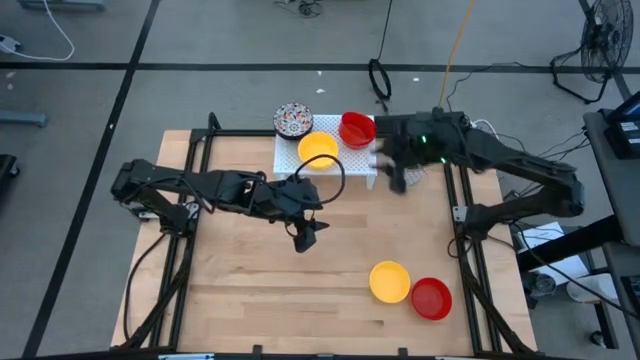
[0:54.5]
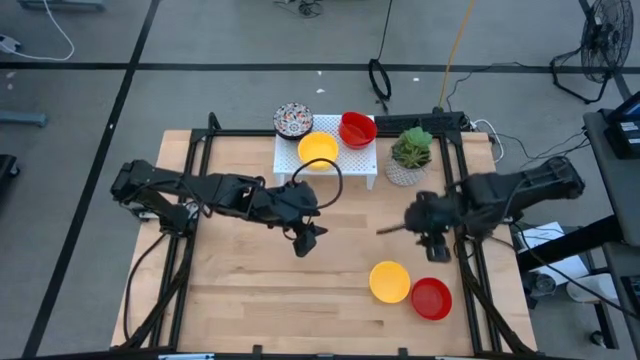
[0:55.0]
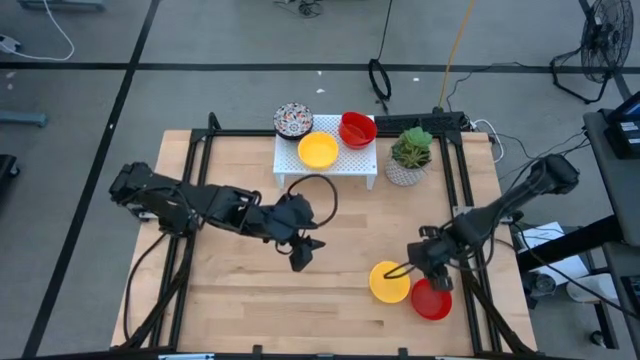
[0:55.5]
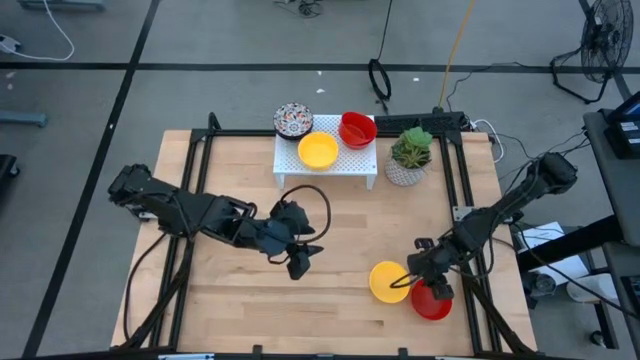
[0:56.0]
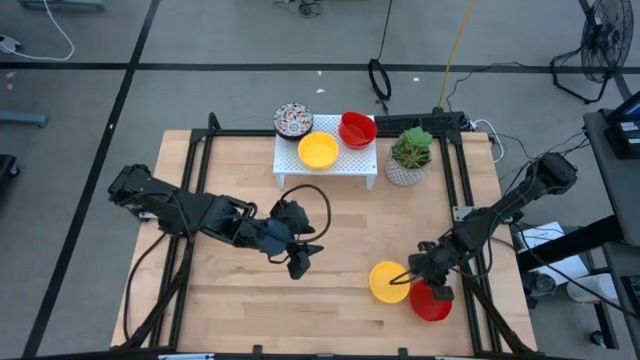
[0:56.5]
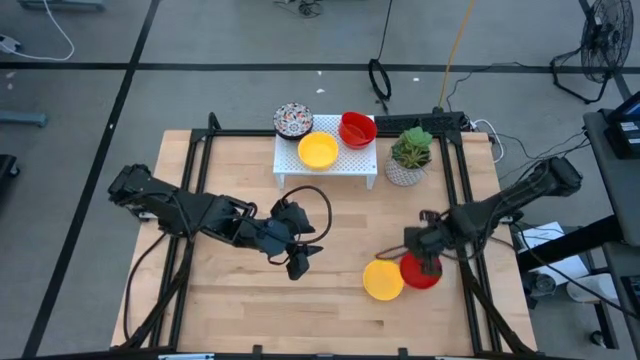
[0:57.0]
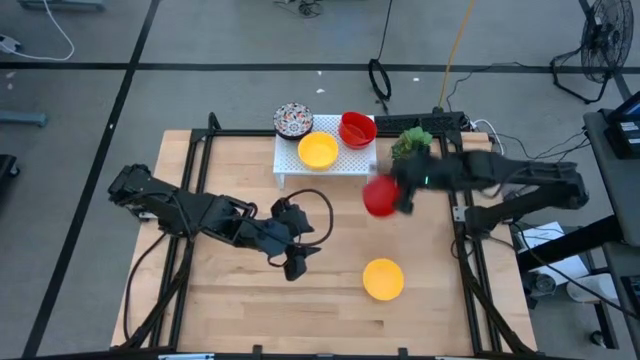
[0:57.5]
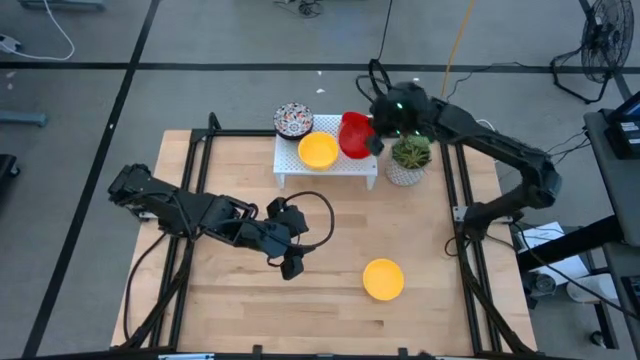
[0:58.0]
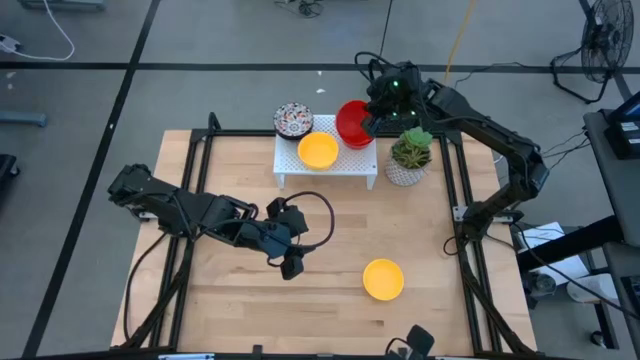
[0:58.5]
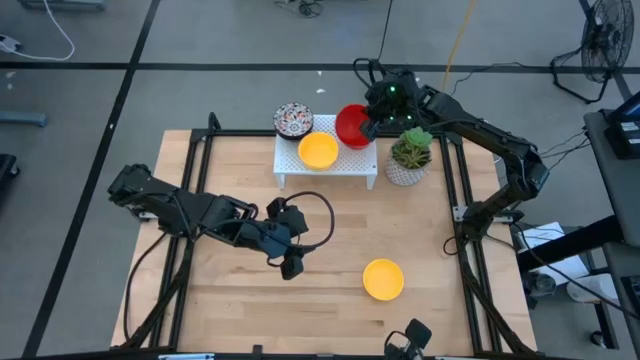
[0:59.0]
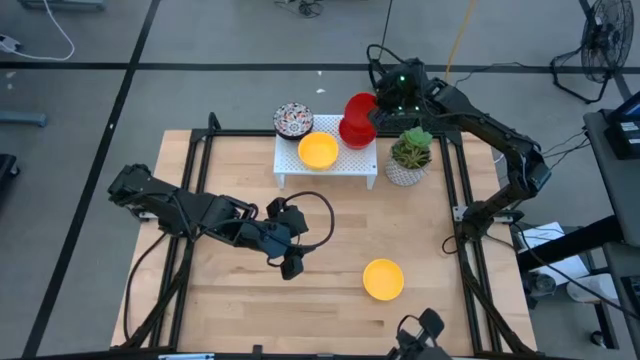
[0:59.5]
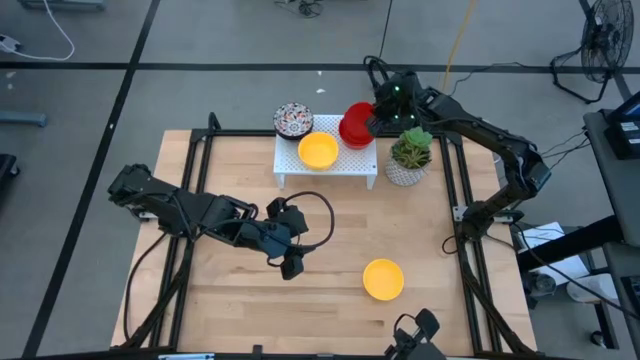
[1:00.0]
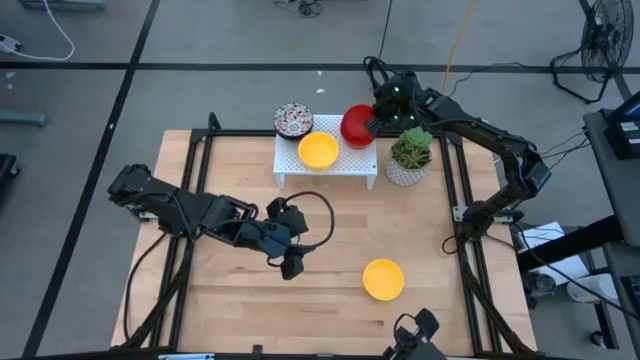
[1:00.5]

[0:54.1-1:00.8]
Task: Pick & Place Mini bowls
Stack the red bowl on the red bowl on the shelf

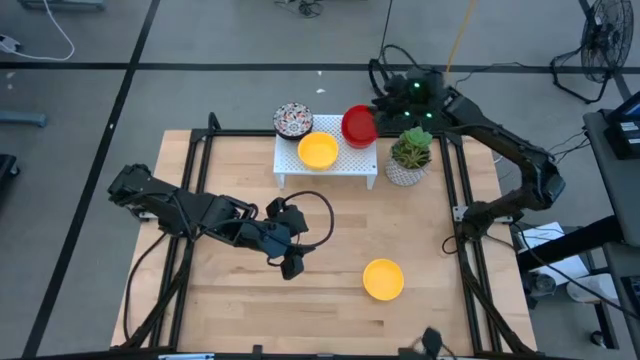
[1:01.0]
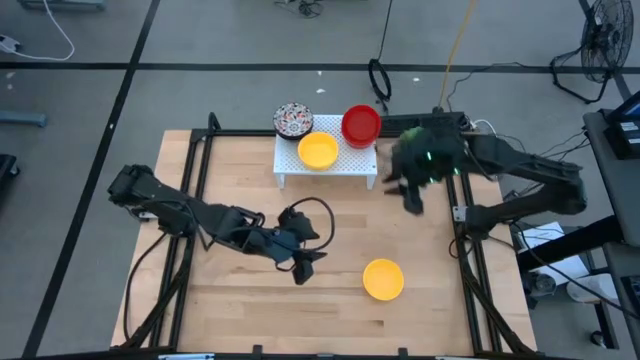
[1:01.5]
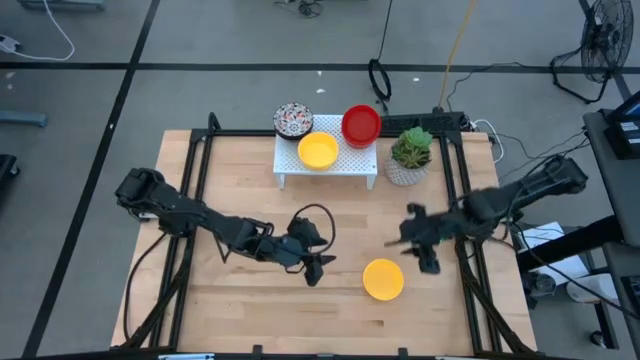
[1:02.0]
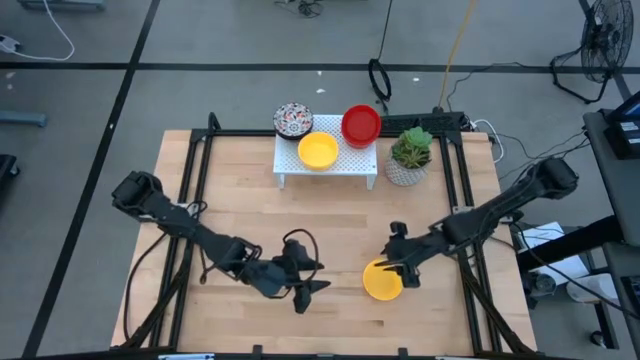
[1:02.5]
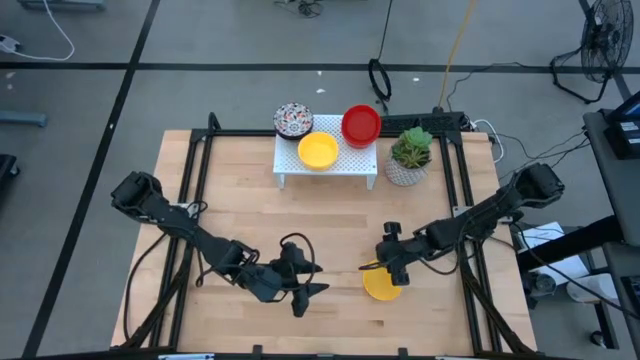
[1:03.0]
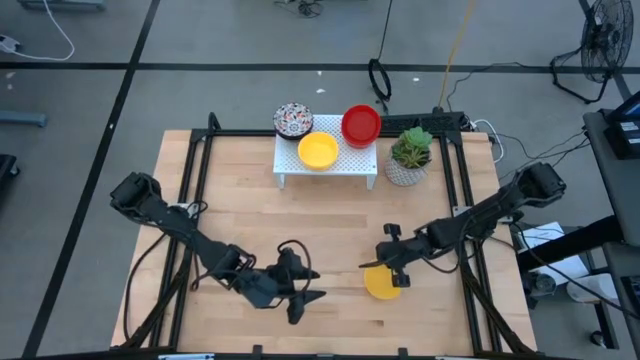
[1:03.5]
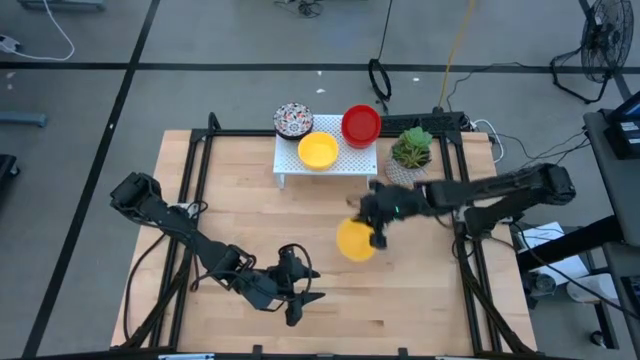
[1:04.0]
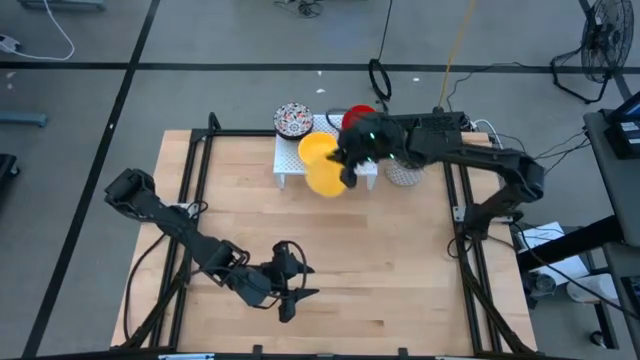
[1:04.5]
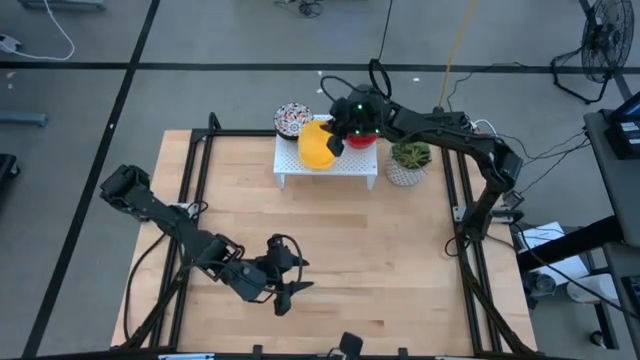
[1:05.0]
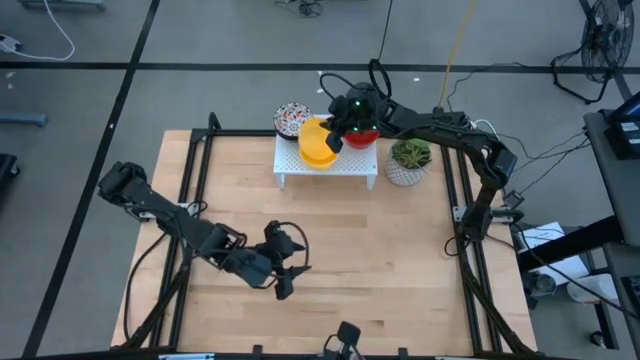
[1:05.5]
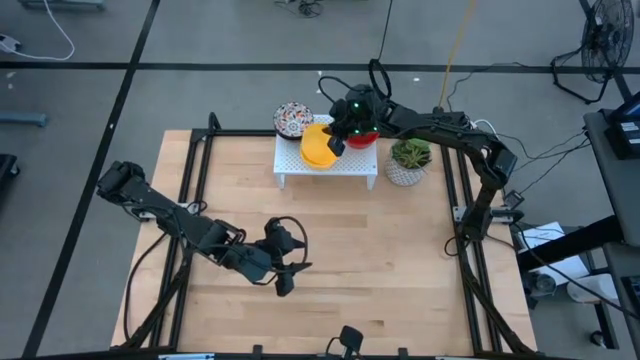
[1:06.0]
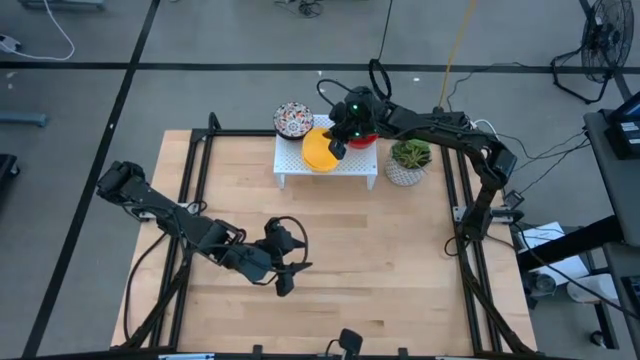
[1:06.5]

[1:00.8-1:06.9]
Stack the yellow bowl on the yellow bowl on the shelf

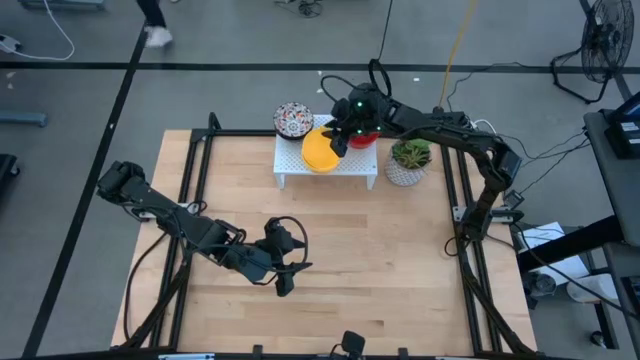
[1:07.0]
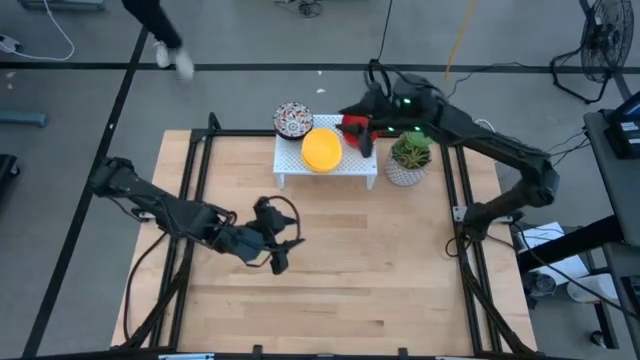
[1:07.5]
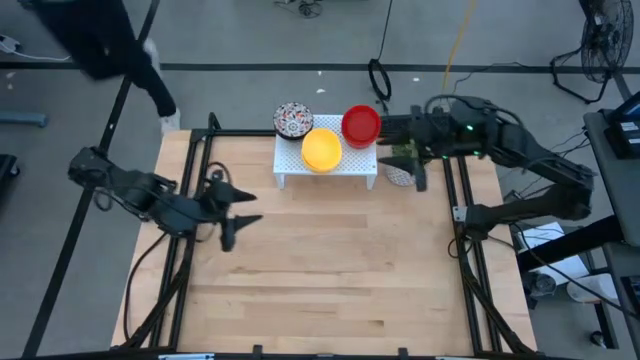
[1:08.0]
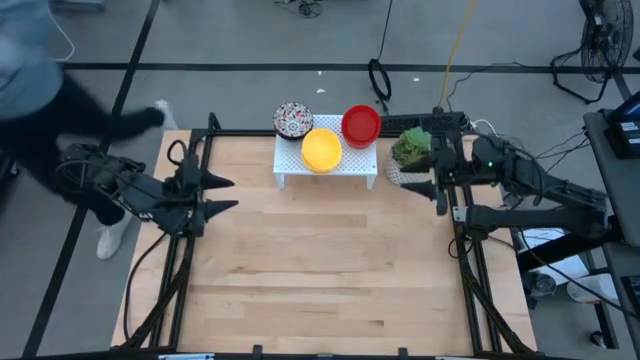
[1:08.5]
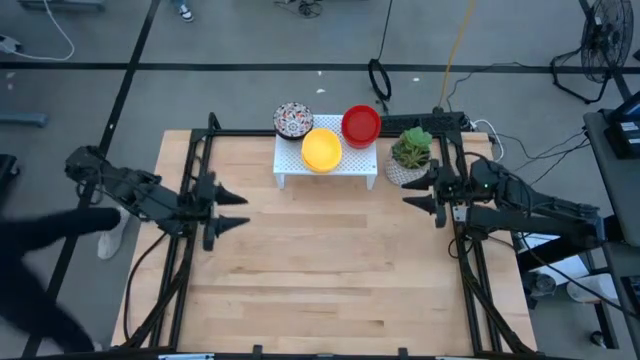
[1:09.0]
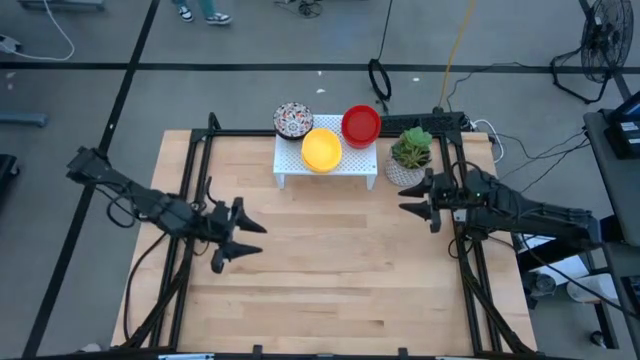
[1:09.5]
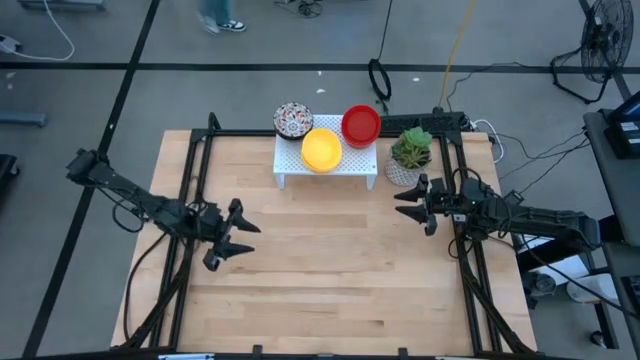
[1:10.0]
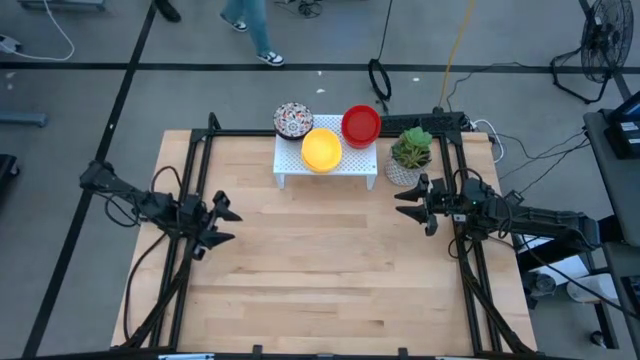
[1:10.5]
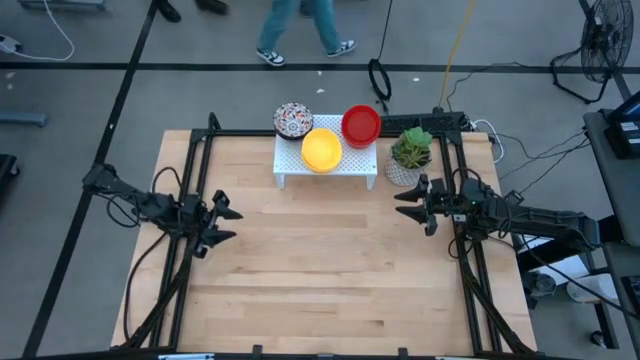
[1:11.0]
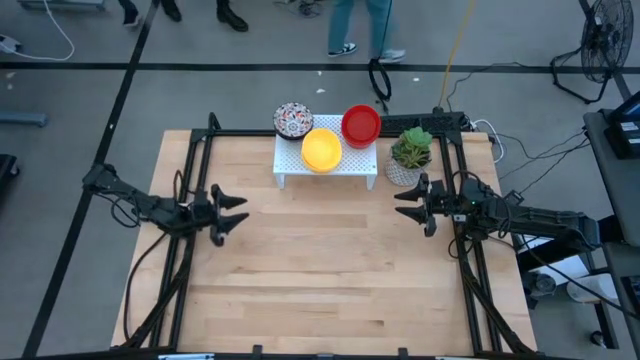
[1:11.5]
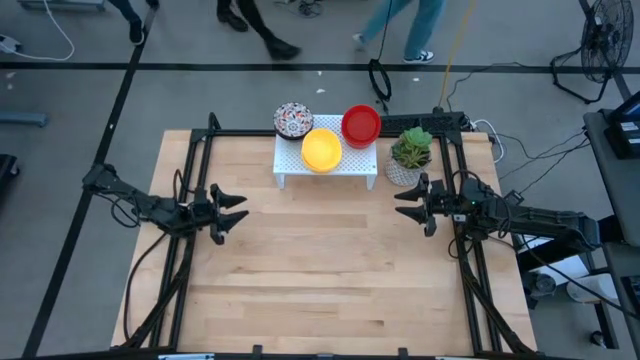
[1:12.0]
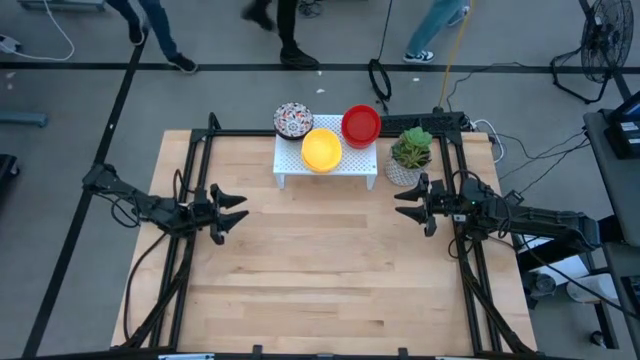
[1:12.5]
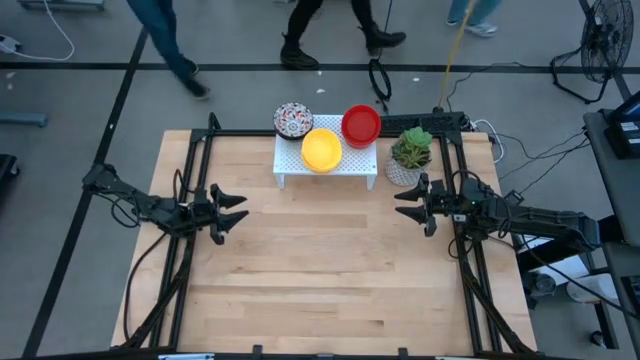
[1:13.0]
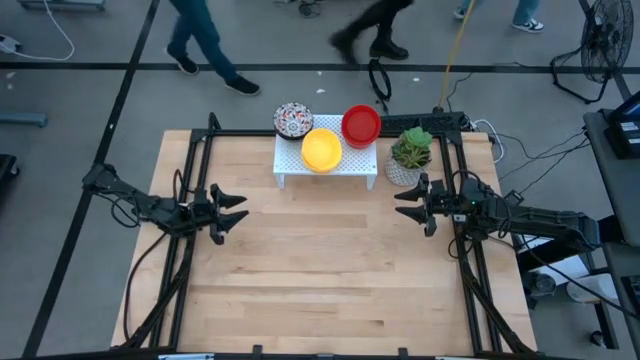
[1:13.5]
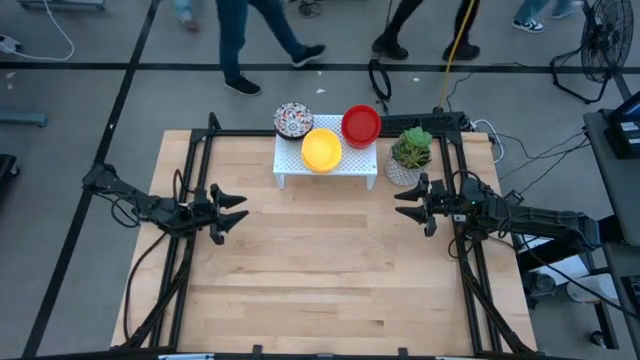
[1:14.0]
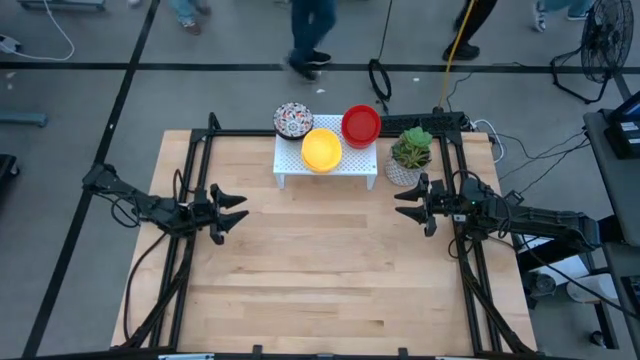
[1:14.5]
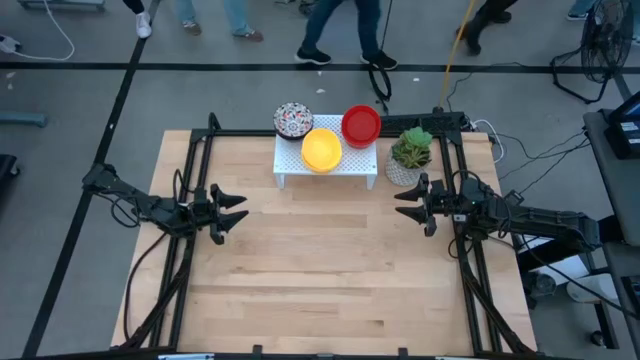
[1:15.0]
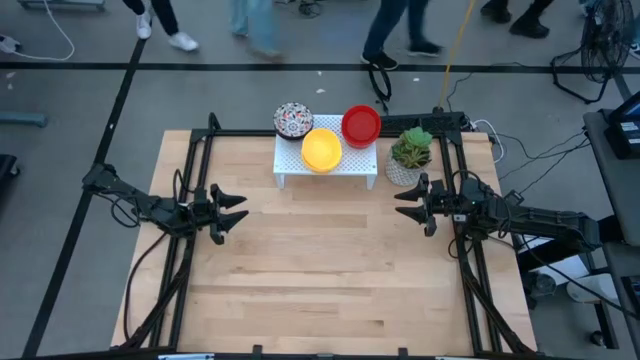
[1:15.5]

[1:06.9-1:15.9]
Return to Home Position
